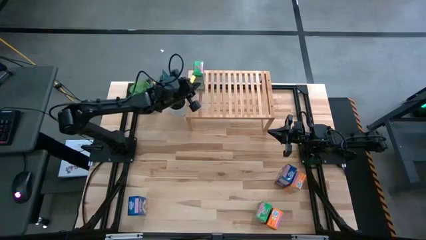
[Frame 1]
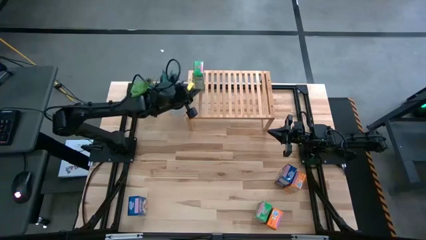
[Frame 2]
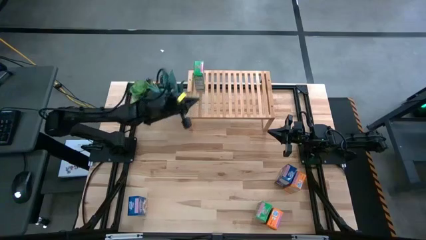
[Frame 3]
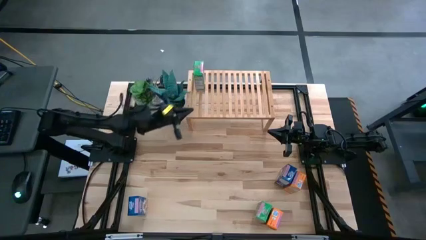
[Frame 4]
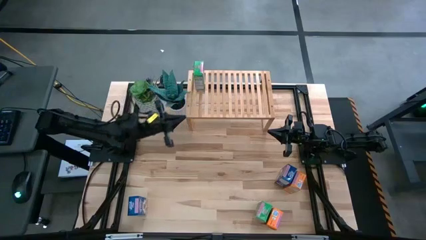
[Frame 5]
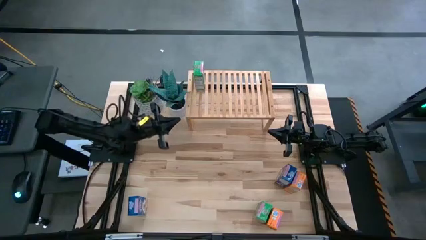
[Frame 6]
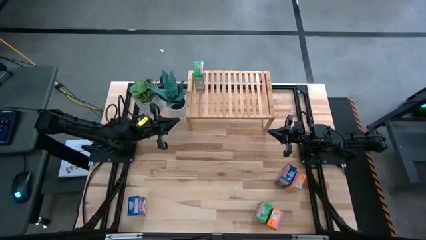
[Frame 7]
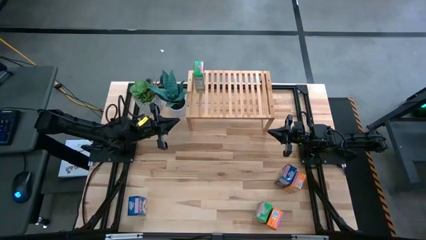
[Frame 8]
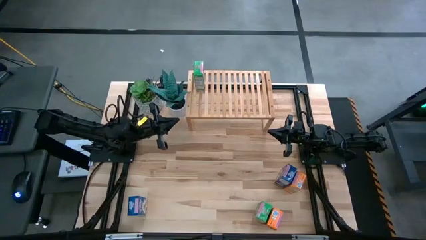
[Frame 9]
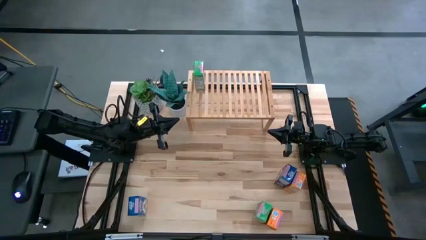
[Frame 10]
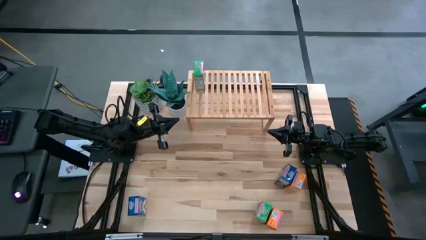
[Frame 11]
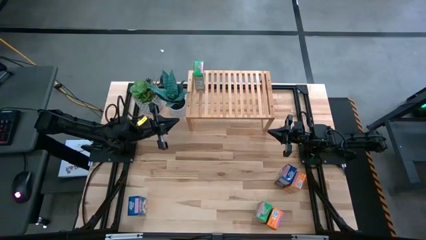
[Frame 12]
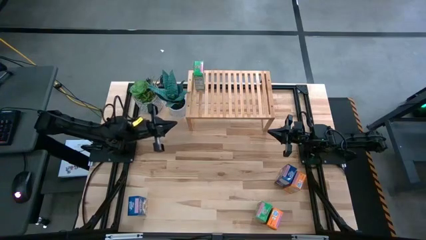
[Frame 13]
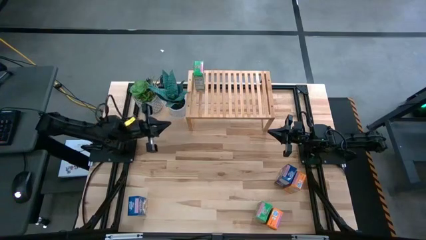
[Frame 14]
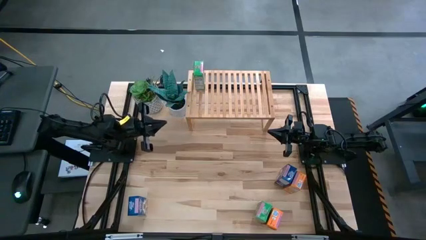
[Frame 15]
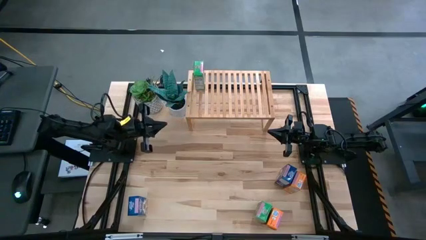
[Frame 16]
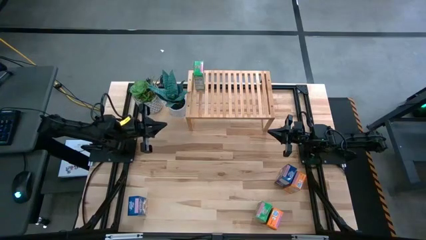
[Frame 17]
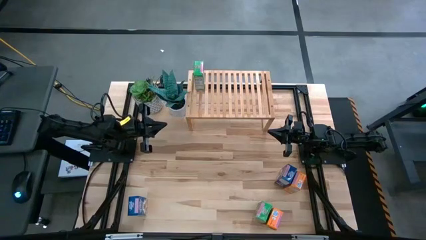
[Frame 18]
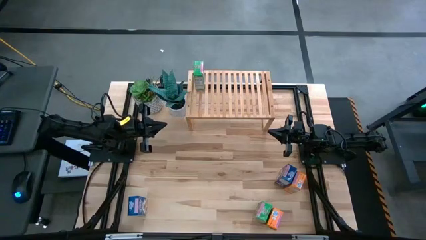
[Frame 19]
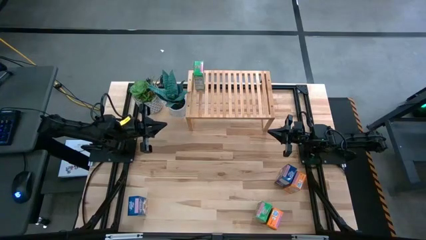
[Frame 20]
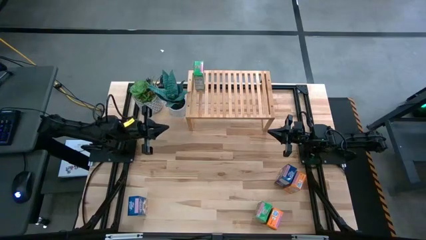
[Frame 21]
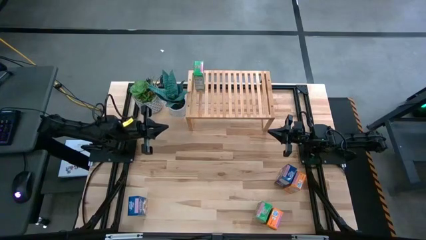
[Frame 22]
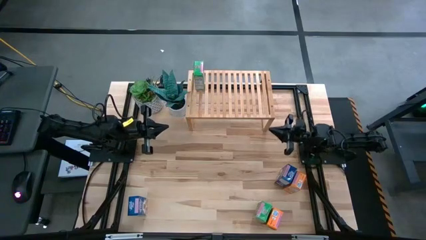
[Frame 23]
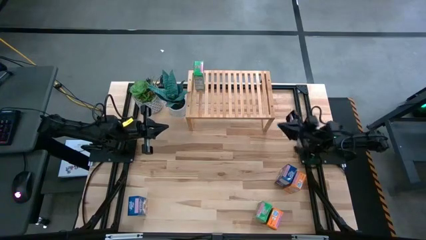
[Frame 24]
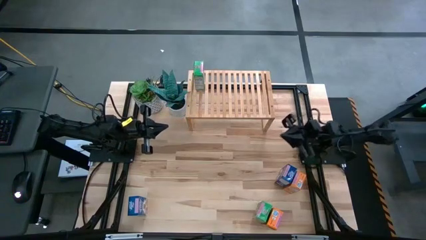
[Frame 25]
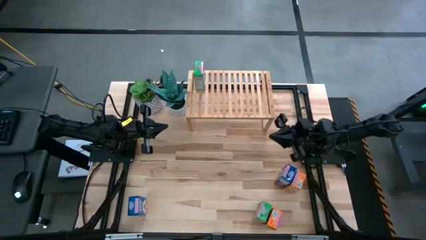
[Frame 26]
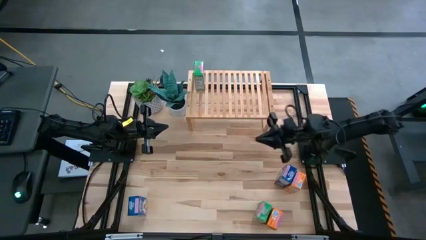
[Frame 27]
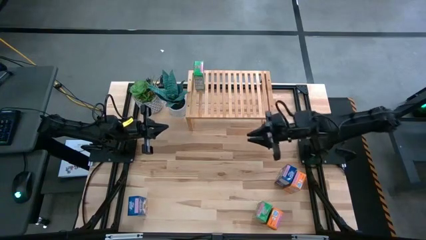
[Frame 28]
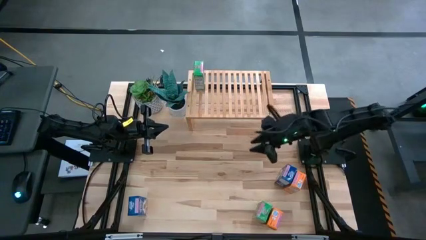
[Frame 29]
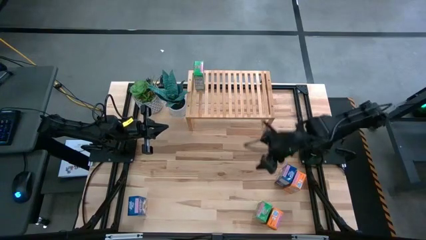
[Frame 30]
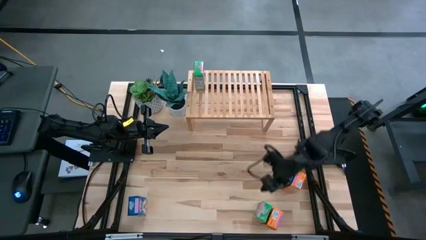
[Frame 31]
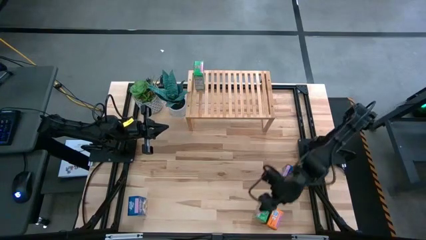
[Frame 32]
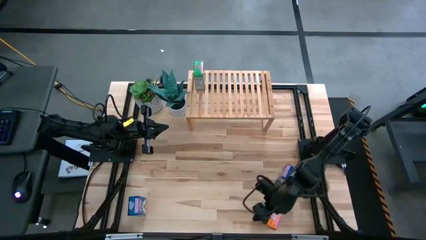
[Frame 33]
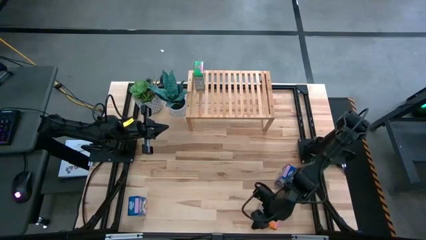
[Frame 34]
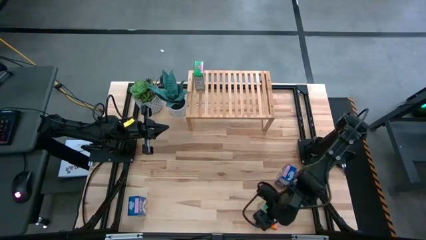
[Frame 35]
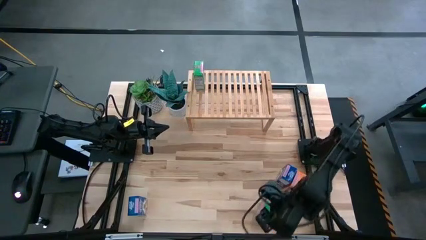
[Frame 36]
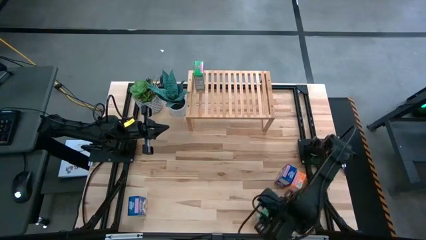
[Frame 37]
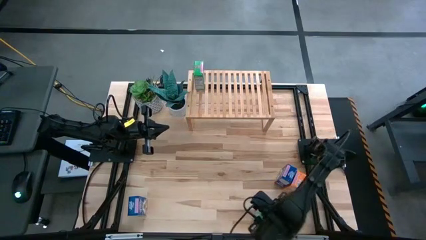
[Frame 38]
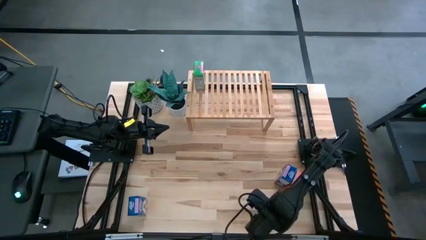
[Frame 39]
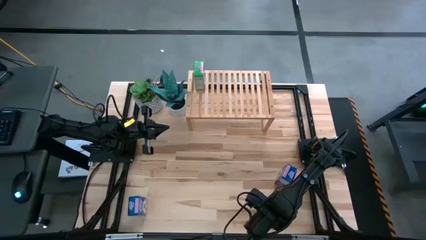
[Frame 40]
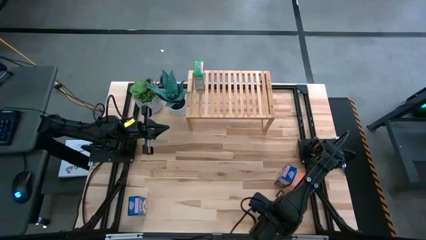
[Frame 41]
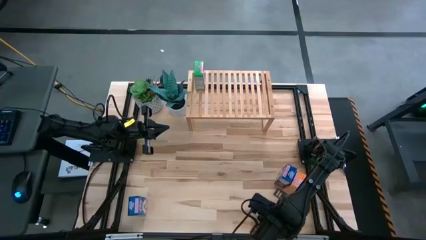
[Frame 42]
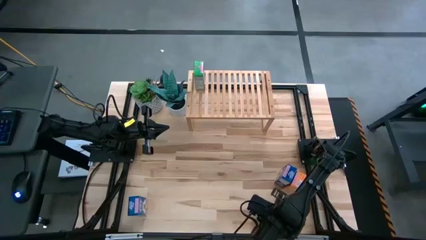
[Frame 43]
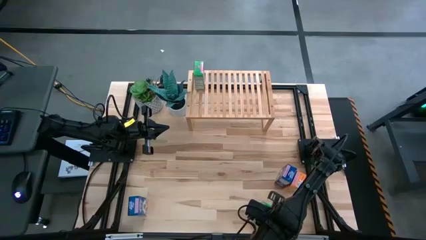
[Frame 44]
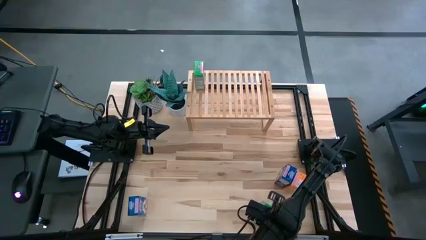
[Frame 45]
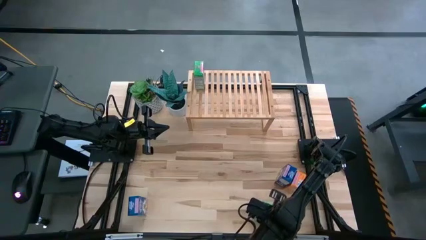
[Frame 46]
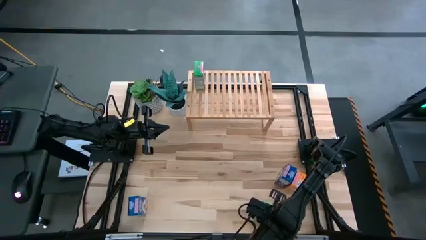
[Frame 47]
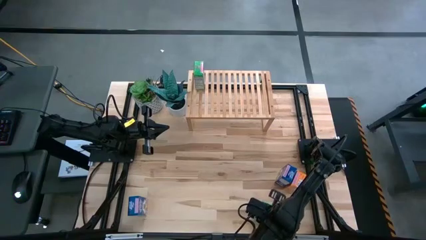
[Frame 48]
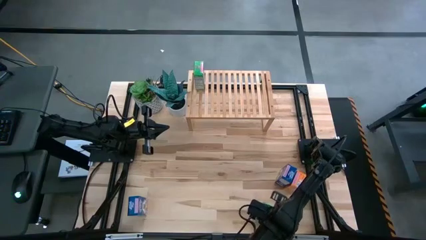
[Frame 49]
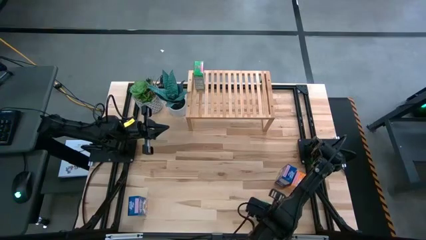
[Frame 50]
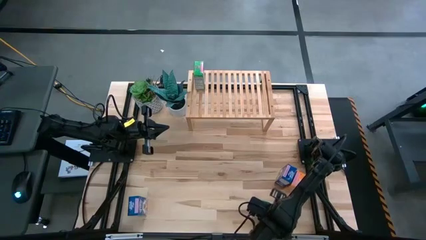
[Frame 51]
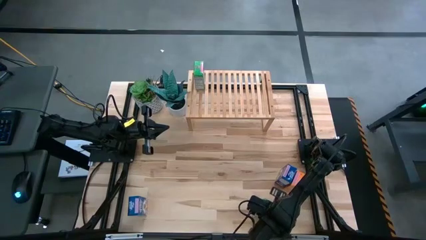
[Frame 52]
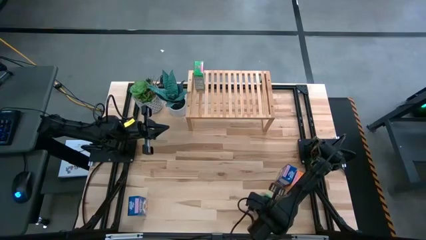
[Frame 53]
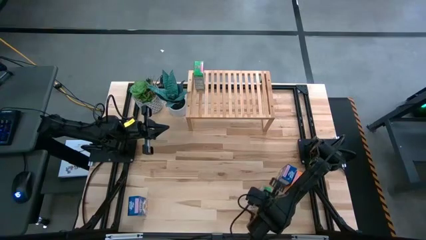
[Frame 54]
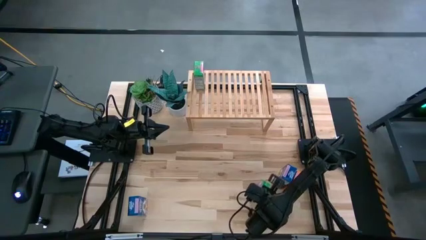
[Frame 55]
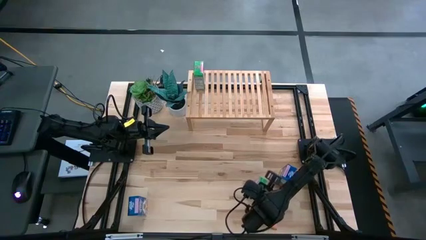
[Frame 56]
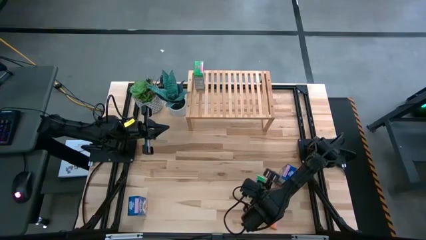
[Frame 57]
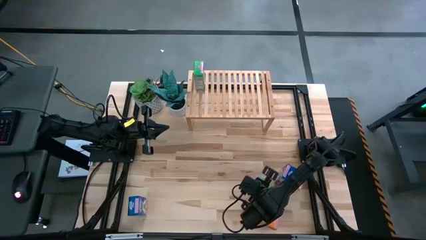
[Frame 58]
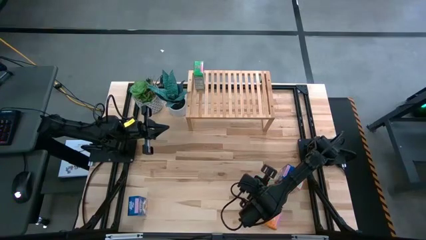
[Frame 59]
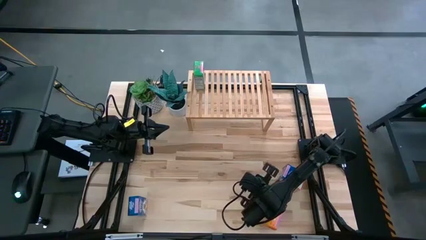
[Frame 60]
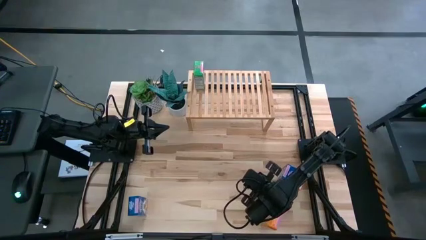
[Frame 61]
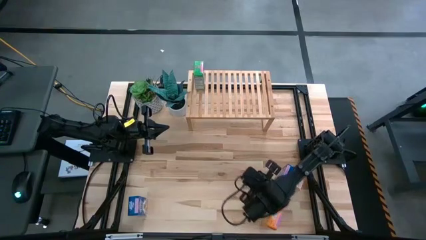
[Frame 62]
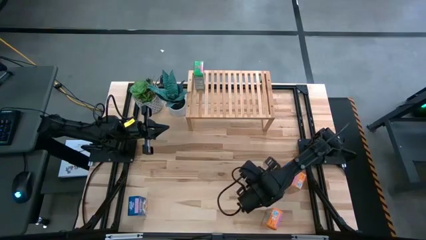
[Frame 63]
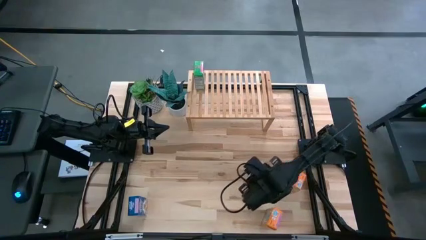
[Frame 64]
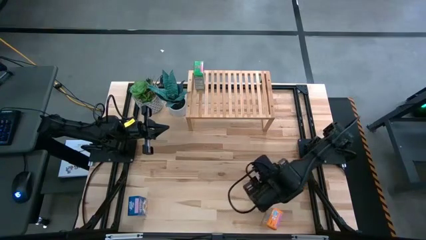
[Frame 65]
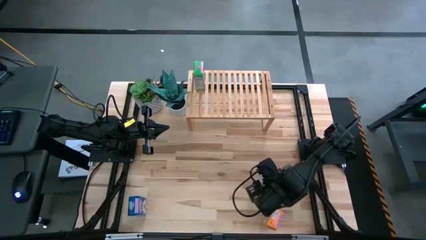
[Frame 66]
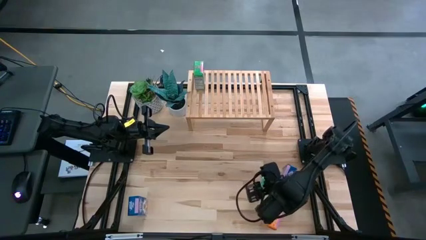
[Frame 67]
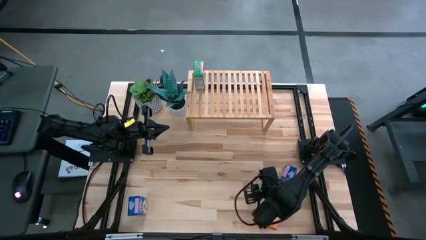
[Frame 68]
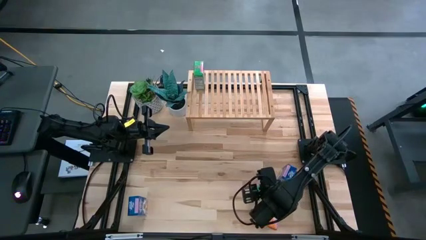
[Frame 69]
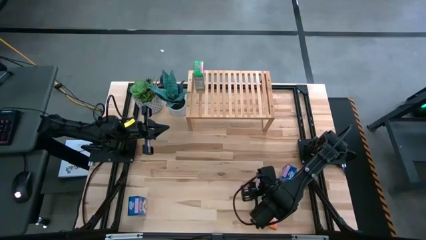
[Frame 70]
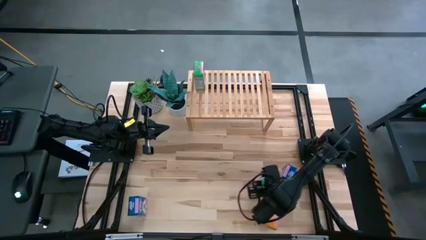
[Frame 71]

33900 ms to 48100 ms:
Task: Stack cereal on shelf
Put the green cereal box on the shelf aligned with the other green cereal box

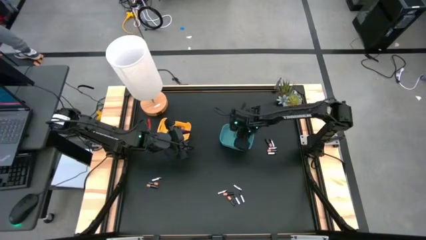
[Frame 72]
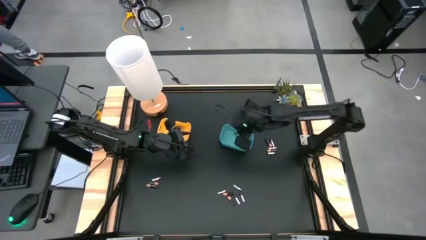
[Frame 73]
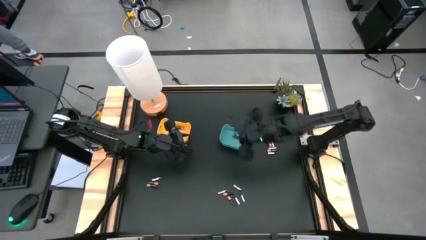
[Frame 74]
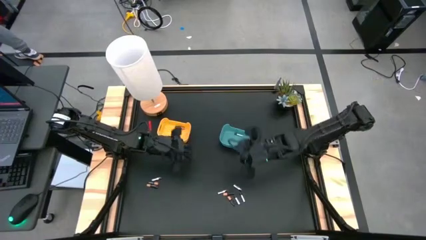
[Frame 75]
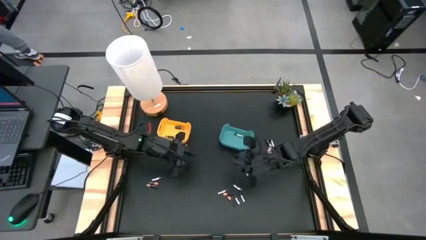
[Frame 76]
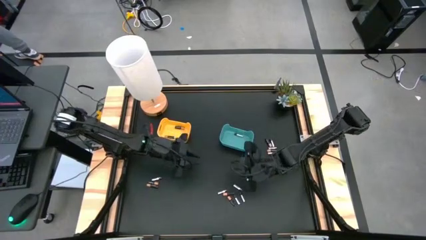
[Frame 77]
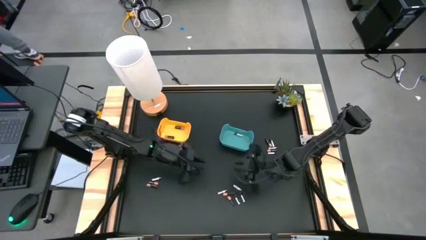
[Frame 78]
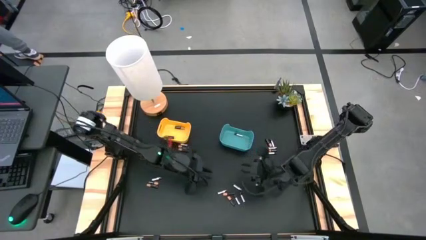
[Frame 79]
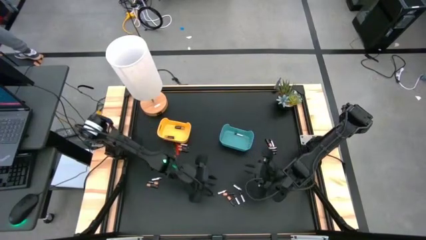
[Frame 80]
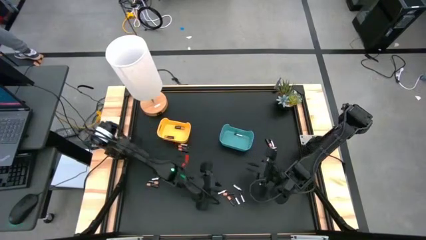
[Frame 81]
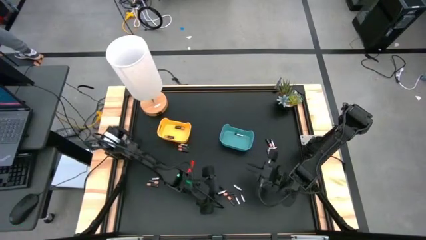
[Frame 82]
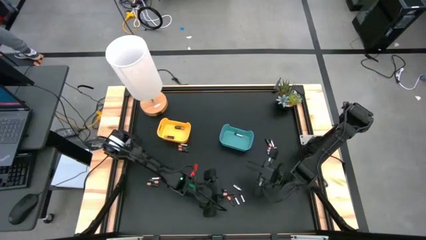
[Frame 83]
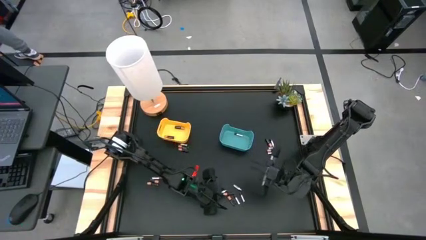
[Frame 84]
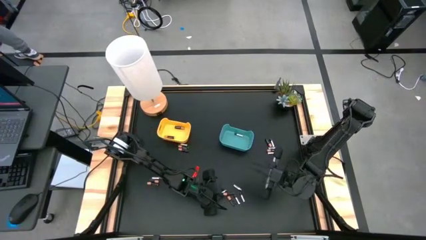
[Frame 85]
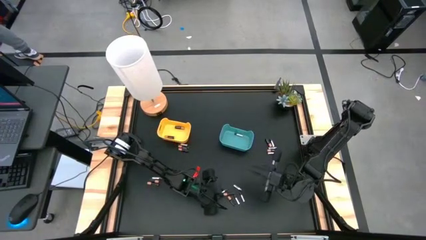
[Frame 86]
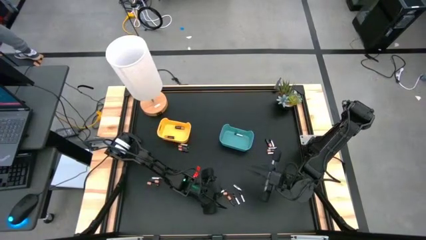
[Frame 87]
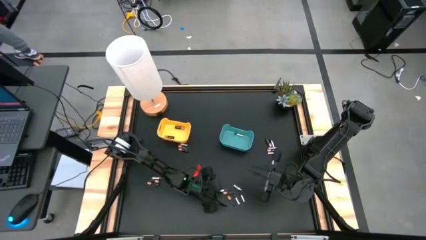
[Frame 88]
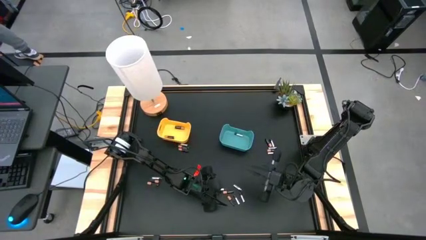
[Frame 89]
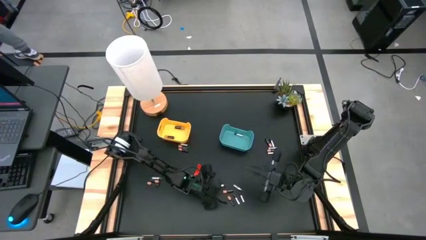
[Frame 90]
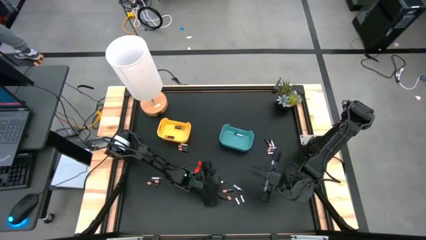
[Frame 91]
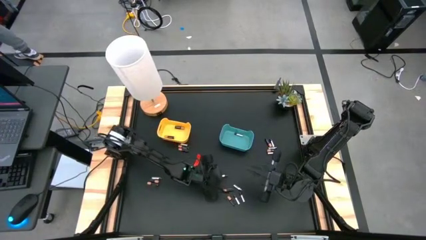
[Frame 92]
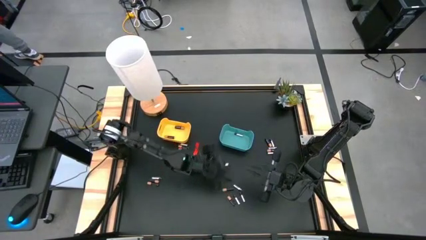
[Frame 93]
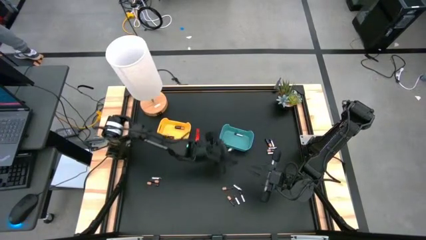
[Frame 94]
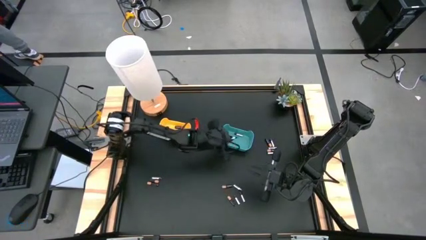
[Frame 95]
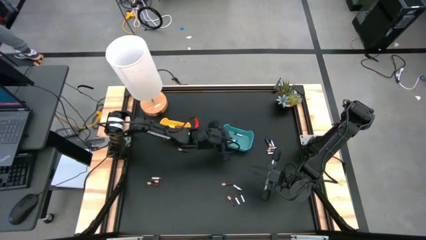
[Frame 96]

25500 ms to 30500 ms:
Task: Sort batteries
Put the silver battery into the blue bin
